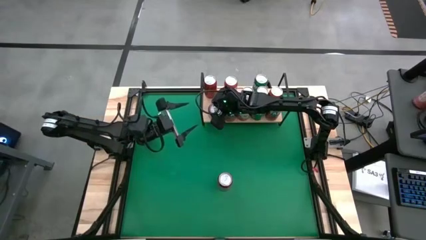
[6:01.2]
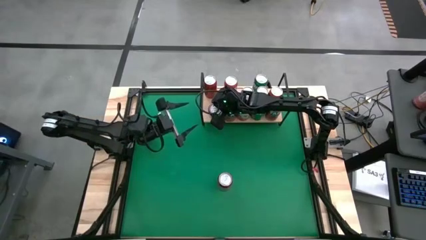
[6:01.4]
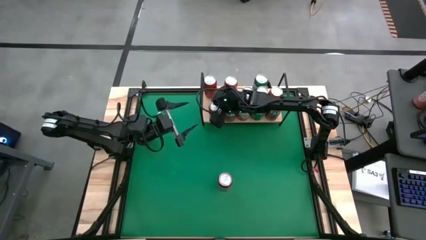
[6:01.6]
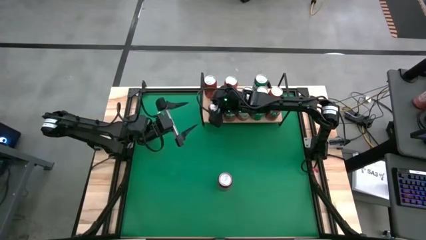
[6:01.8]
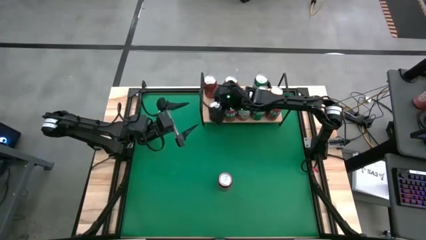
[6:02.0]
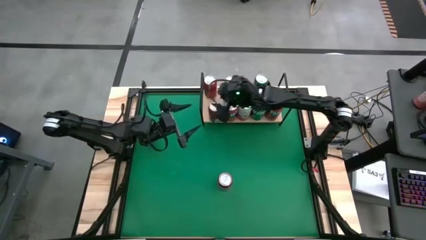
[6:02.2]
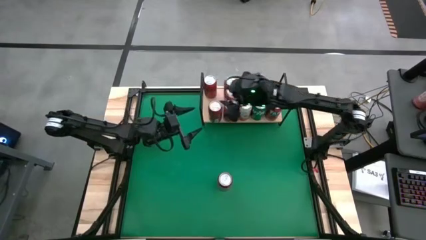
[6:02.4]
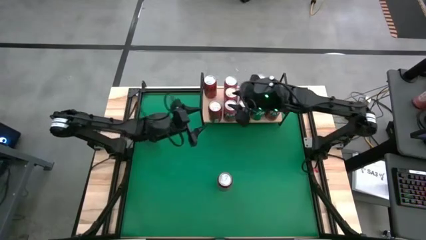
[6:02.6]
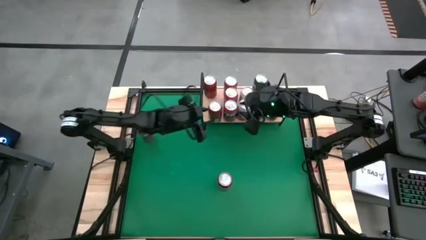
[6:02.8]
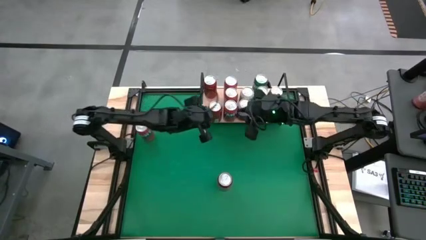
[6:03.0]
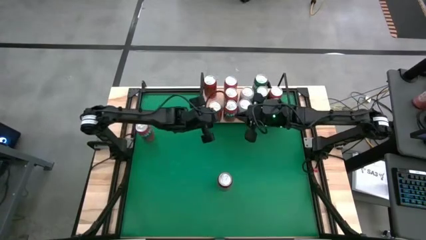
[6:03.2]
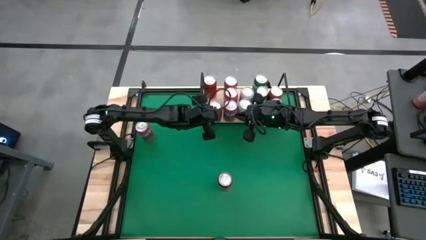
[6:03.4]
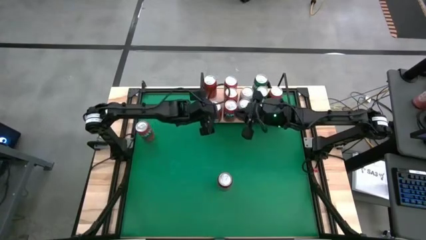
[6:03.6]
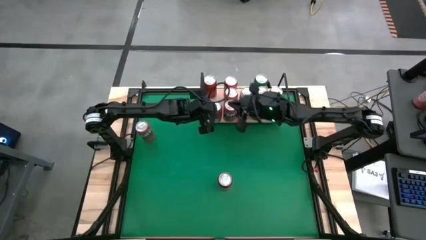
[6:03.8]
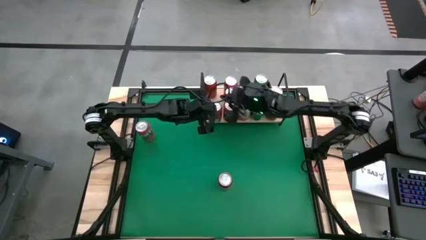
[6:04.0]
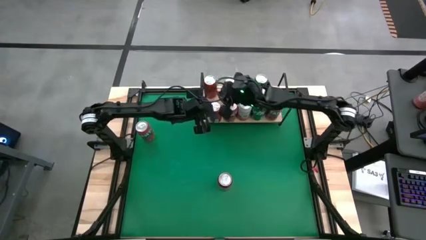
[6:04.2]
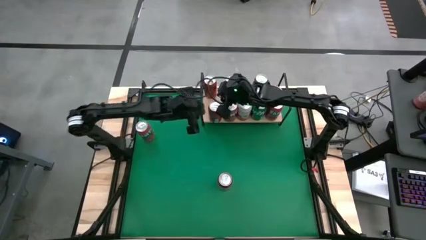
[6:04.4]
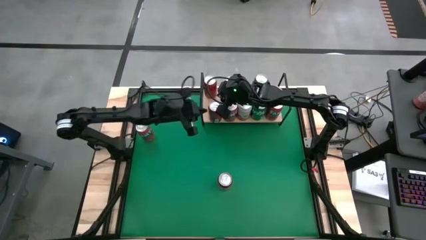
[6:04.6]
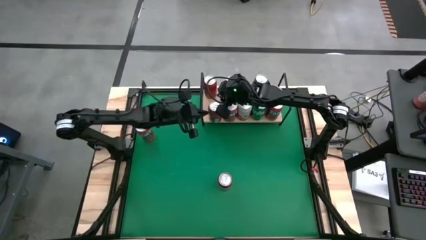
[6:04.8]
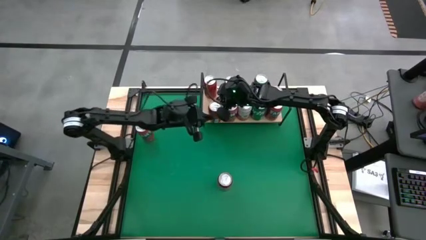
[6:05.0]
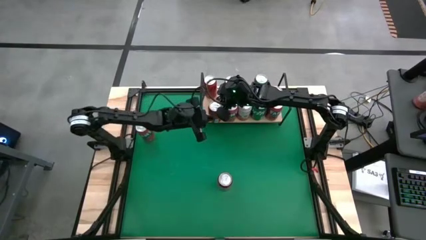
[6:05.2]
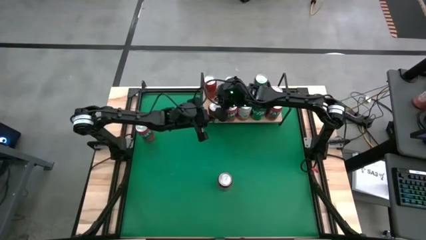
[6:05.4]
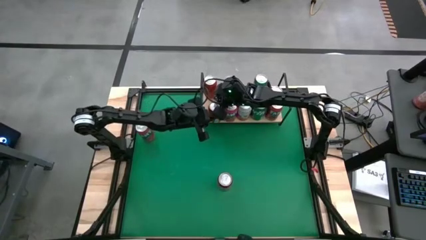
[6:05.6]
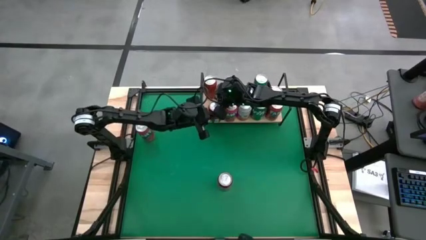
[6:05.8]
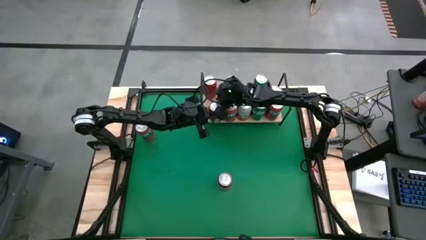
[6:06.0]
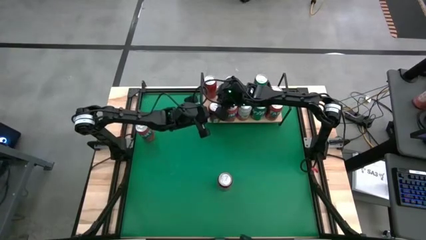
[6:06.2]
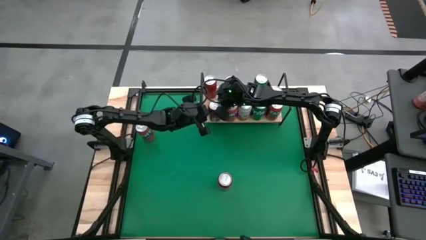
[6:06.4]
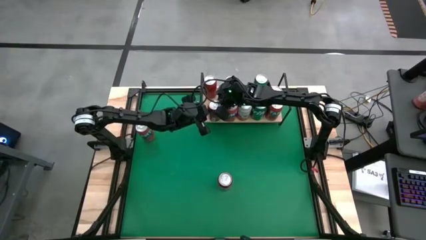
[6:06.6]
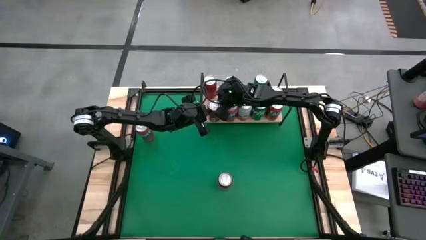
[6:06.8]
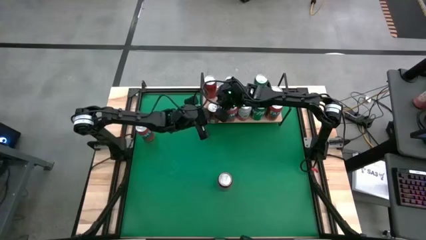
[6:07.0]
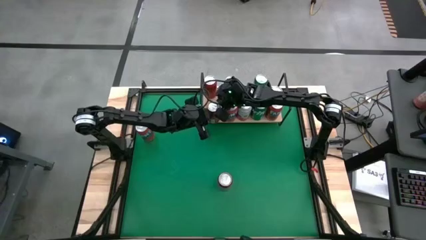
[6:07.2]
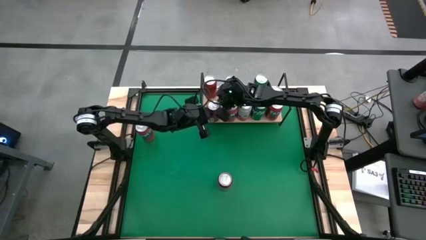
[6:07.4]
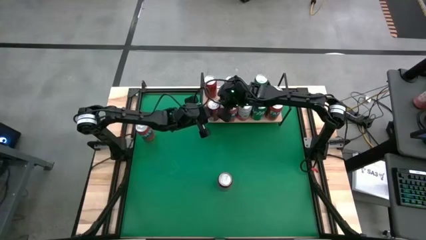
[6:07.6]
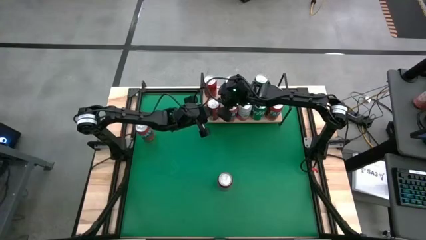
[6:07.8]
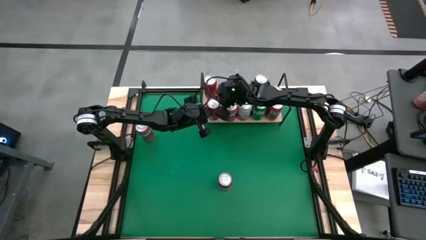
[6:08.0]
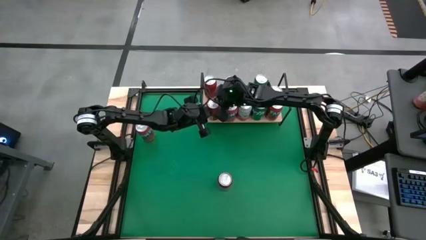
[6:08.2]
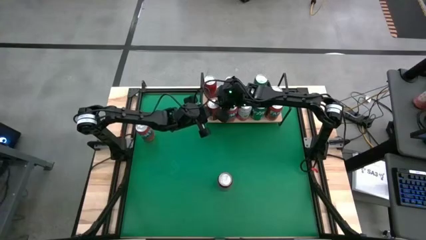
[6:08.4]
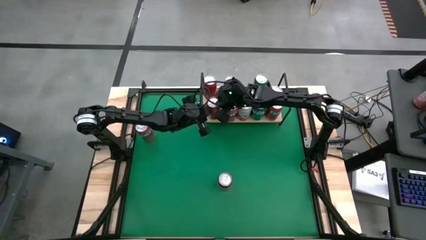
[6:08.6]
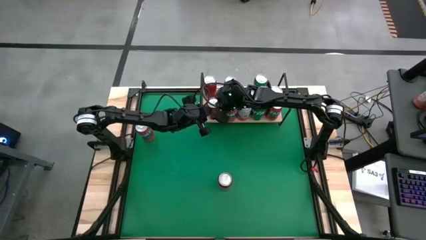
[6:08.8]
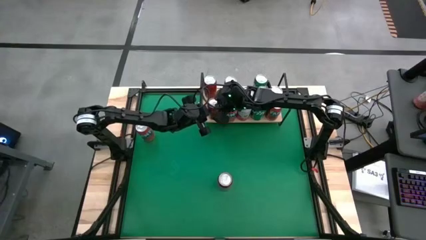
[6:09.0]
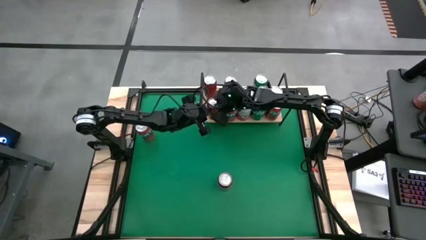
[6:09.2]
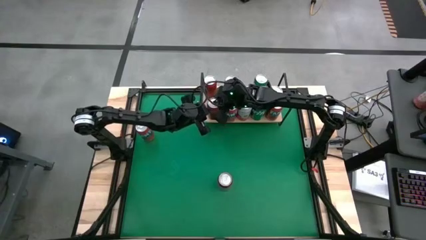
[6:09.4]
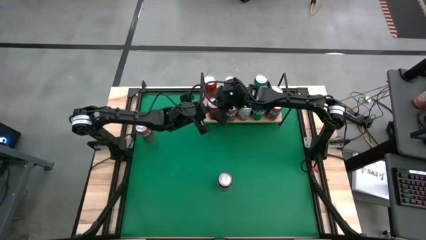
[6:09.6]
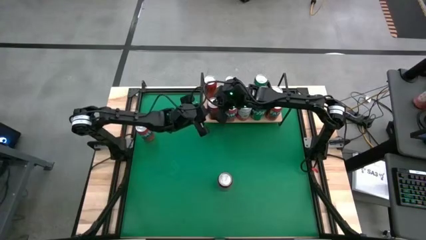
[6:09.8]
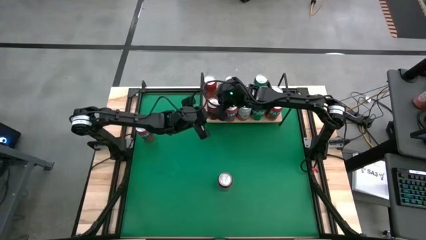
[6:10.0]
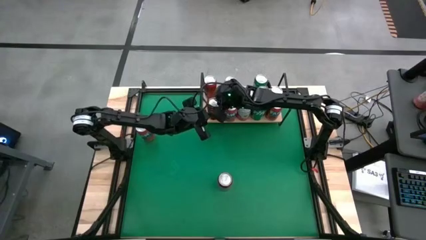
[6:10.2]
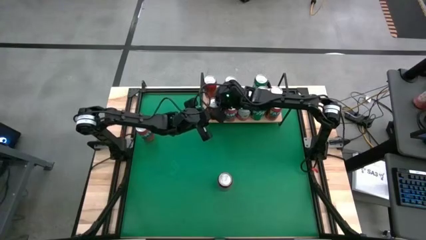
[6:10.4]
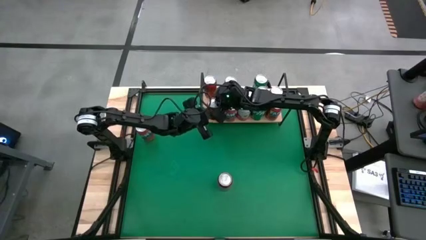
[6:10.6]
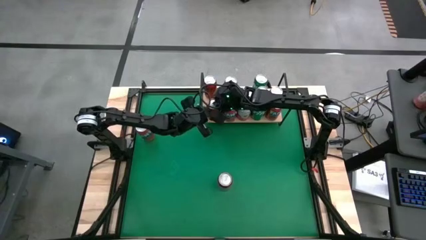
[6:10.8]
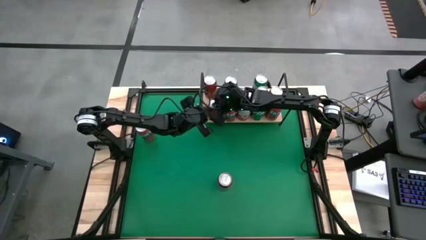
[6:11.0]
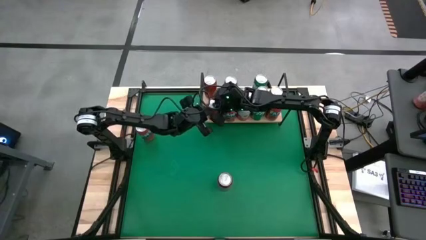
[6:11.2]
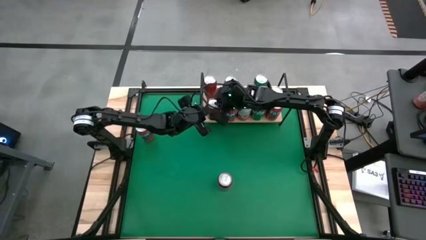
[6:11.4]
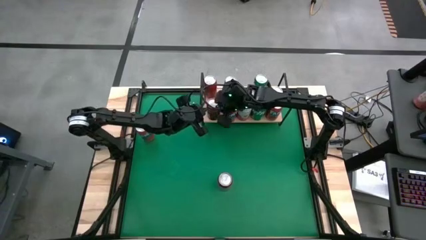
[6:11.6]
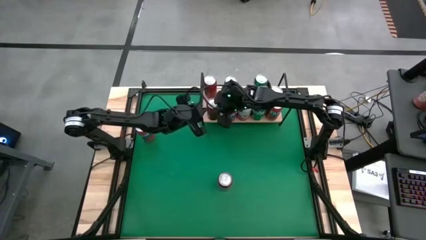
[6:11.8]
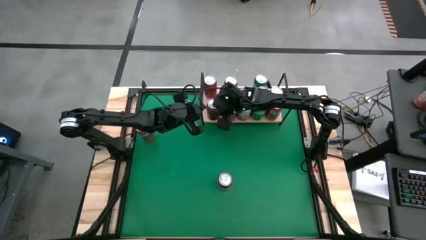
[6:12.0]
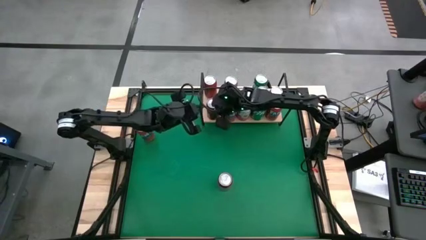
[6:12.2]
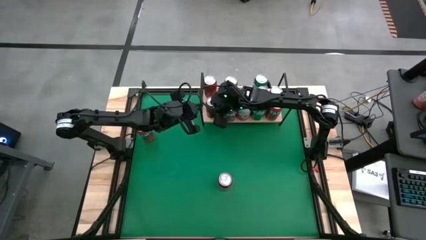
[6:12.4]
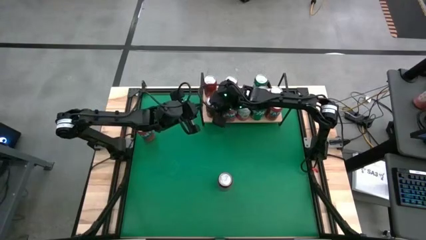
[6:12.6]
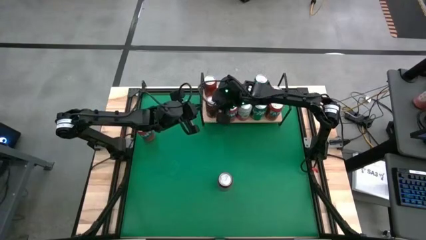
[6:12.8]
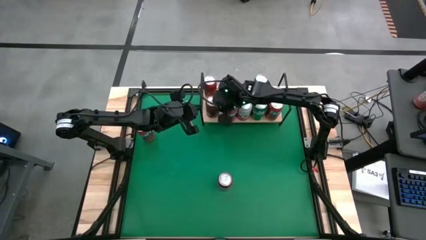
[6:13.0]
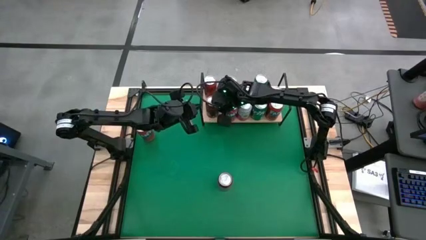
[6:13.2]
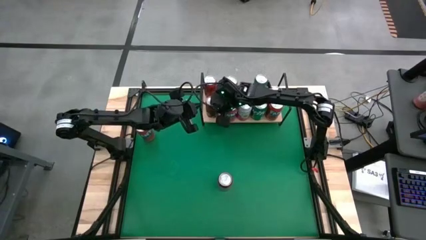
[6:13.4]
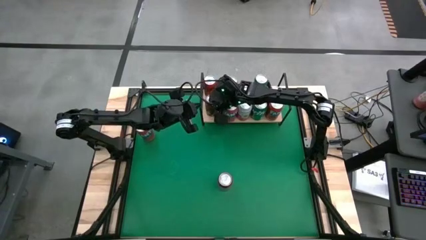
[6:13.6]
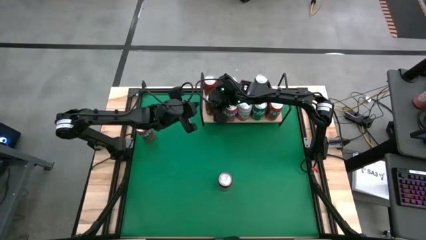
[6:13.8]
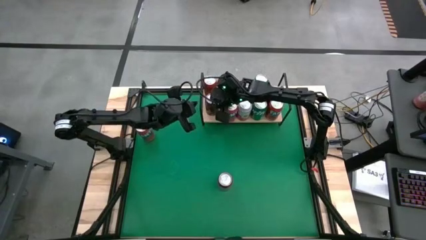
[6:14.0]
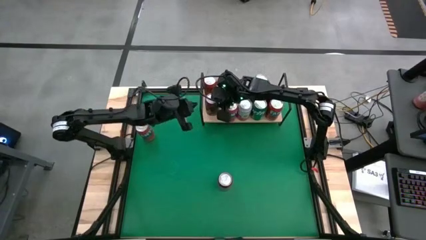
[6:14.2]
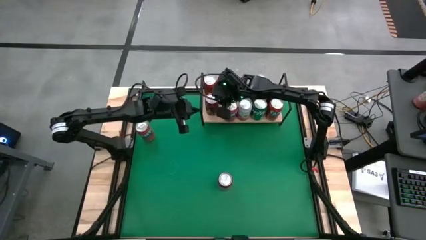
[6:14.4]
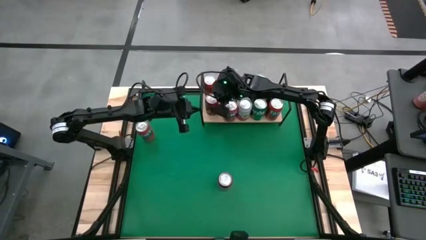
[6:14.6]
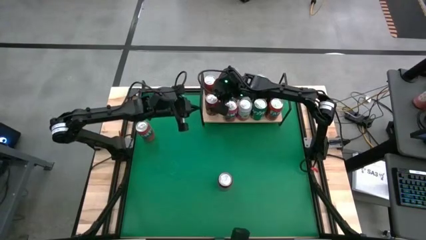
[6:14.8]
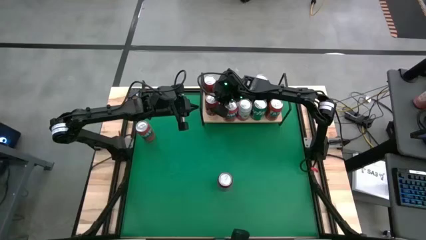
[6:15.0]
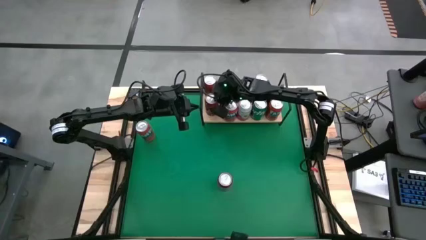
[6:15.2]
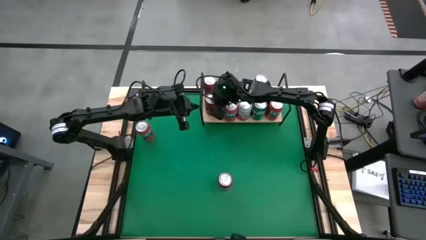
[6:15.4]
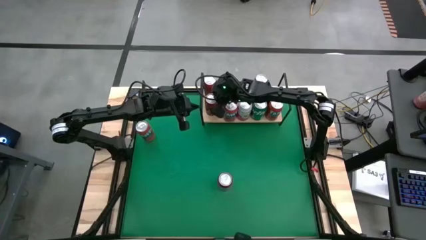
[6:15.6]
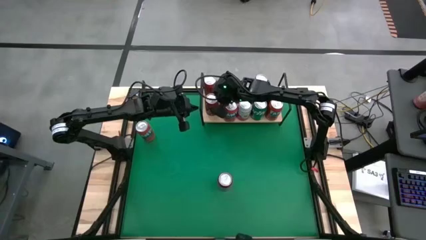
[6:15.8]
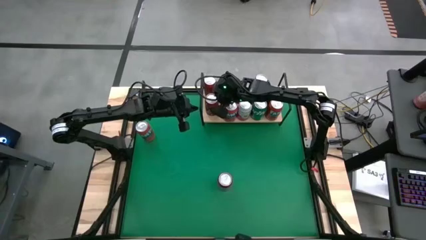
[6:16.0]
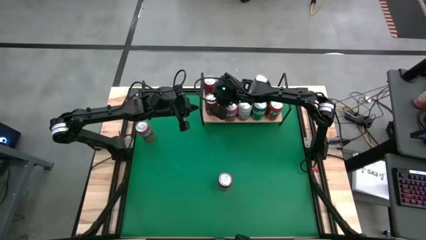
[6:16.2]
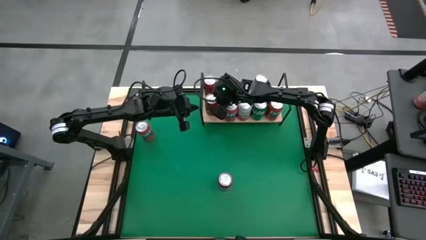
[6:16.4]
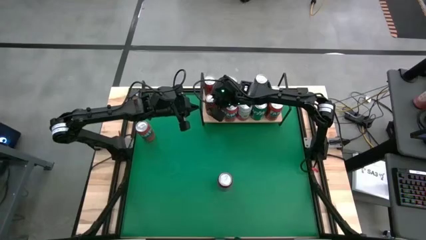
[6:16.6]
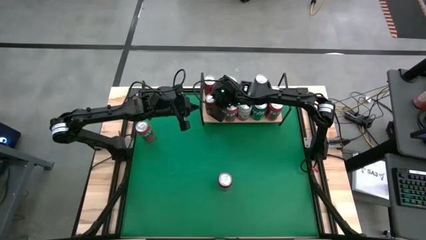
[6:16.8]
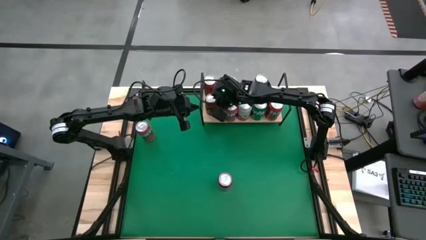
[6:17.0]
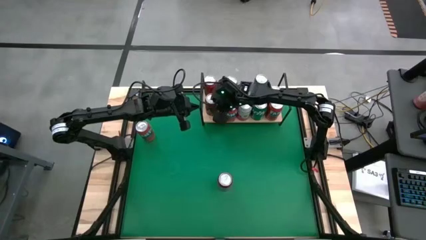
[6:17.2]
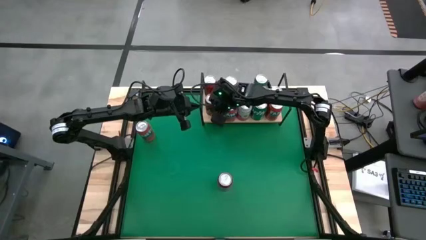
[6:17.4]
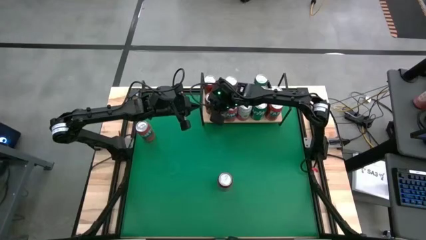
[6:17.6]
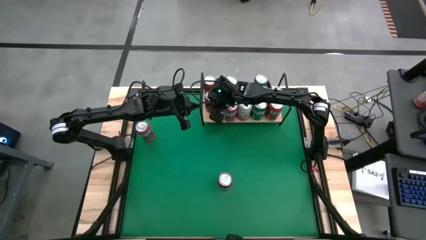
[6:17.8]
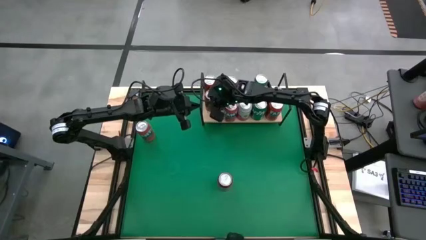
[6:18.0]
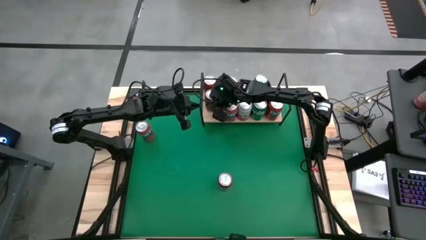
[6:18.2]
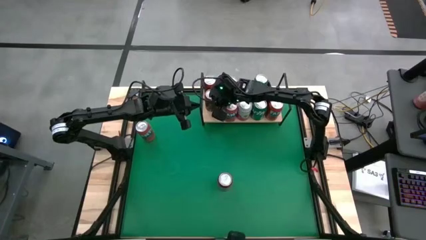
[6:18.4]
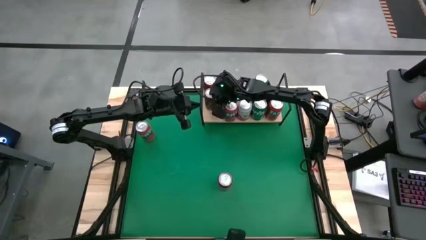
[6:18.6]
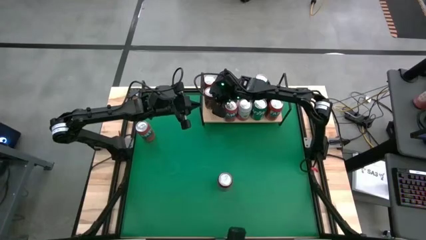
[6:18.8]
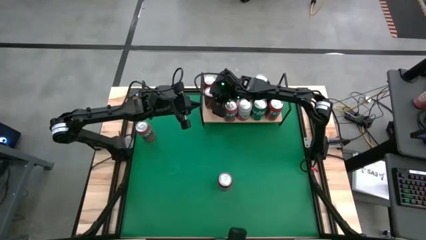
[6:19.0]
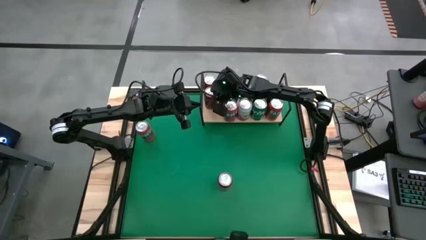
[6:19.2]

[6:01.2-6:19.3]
Task: Place canned beverage on shelf
Put the red-black soda can on the shelf aligned with the other red-black soda can
